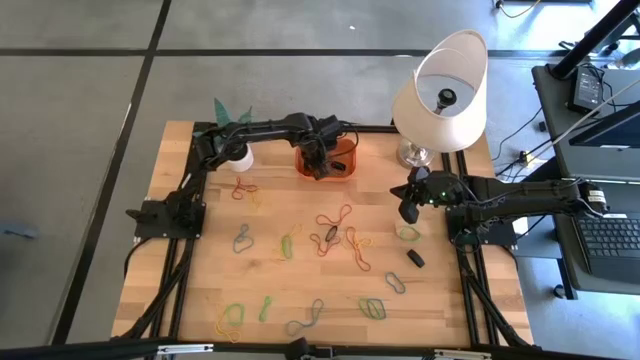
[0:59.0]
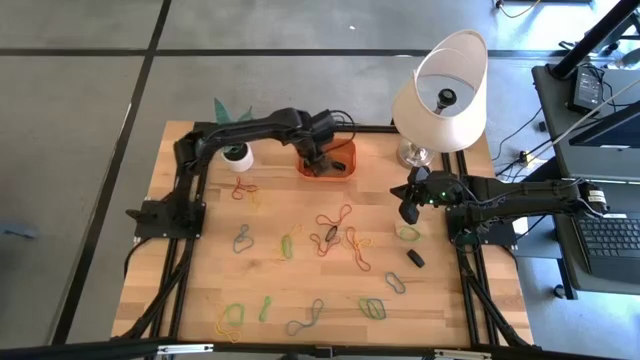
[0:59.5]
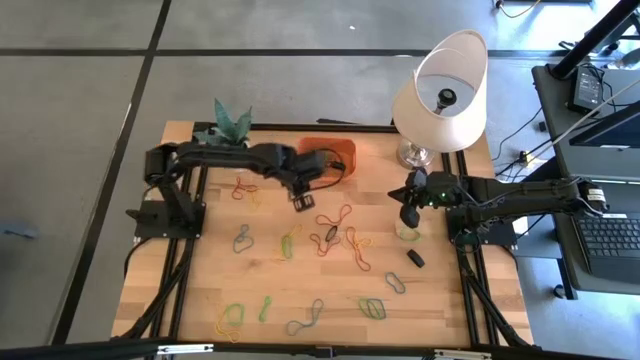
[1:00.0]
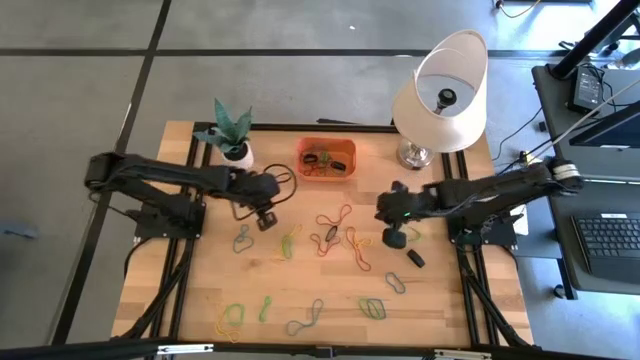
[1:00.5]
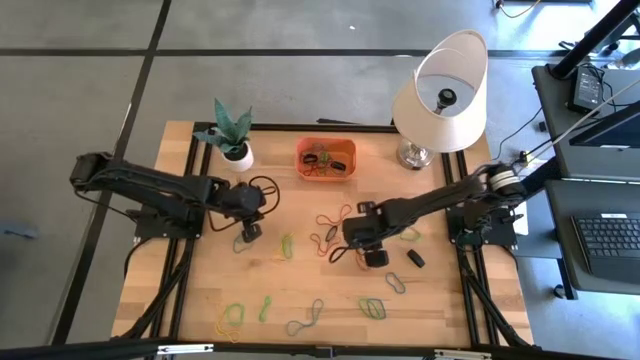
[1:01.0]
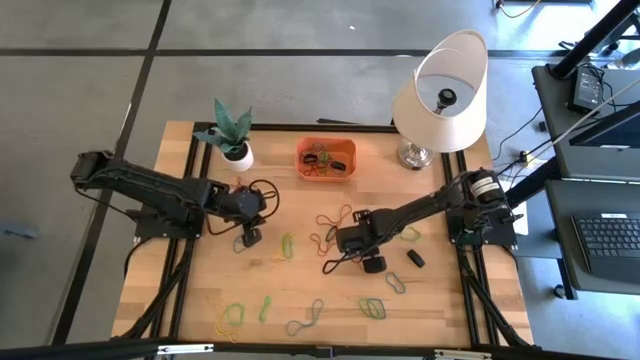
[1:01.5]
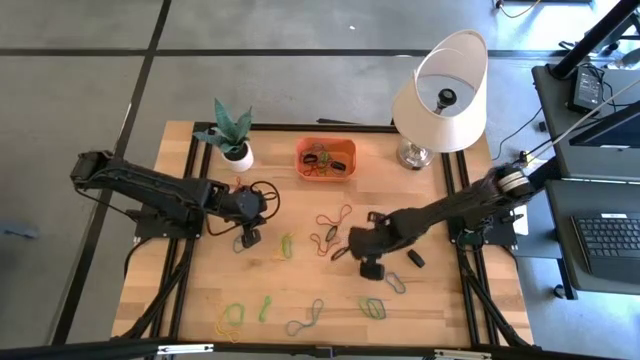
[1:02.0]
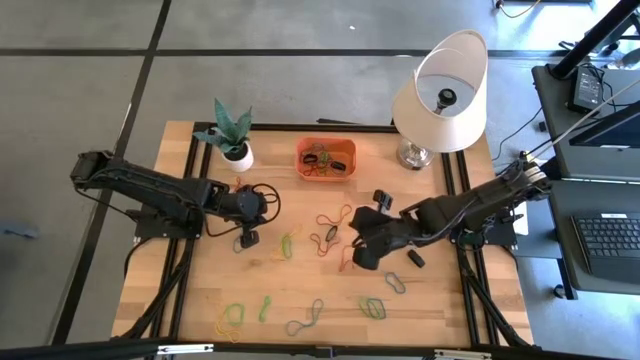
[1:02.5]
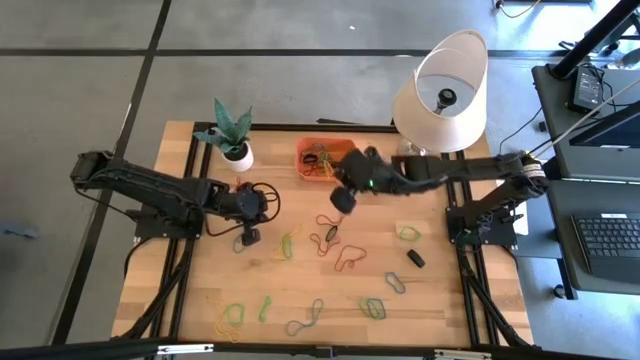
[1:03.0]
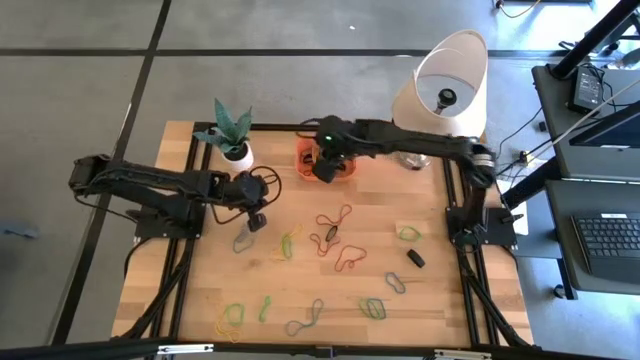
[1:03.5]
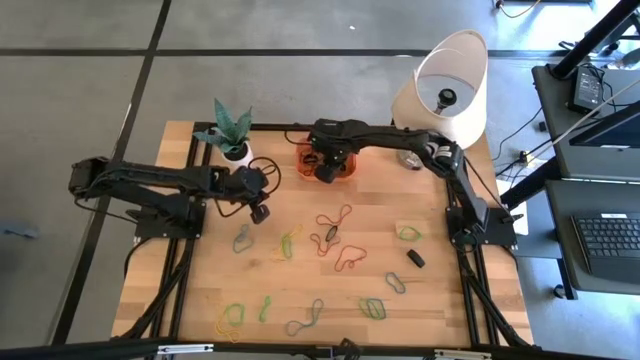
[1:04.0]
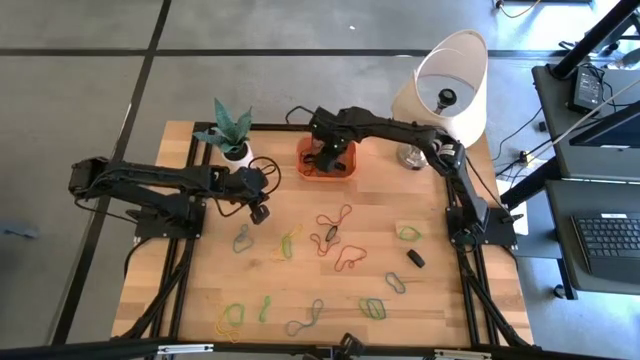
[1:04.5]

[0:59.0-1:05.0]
Task: Pick and place rubber bands into bin
Put the yellow rubber band into the orange bin

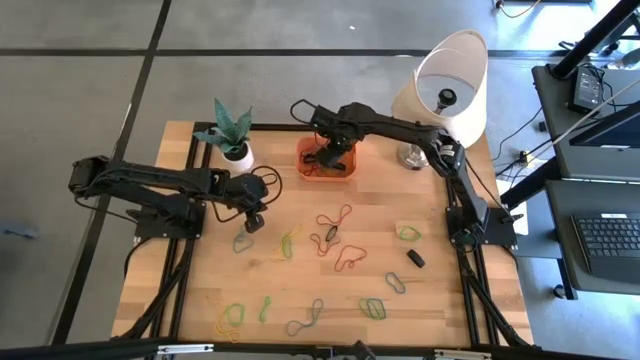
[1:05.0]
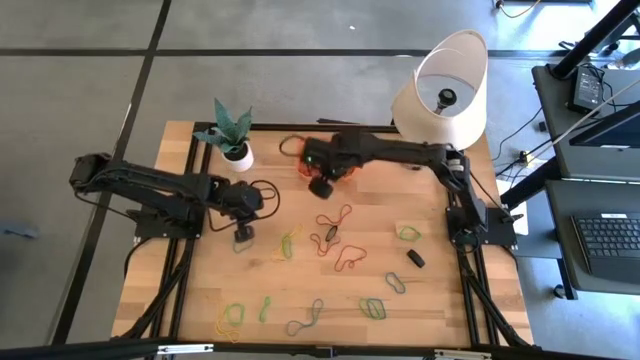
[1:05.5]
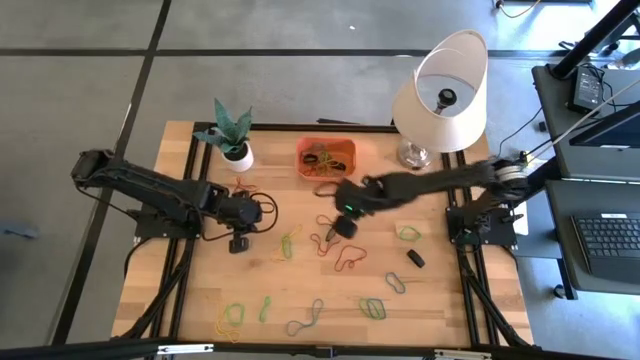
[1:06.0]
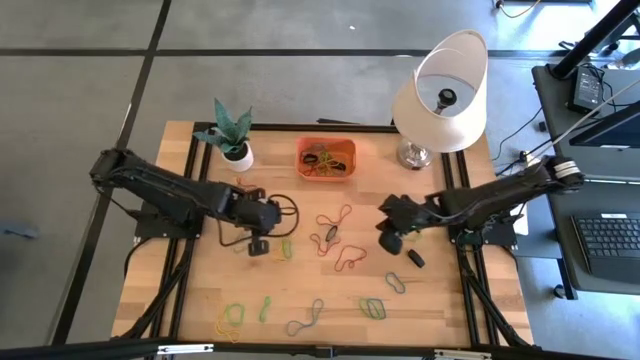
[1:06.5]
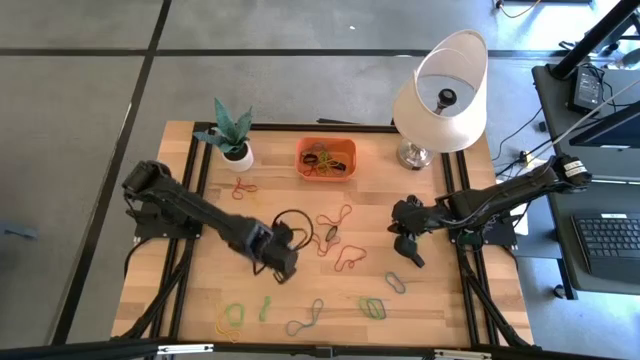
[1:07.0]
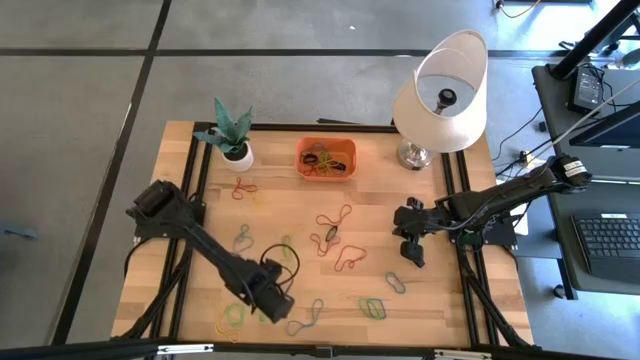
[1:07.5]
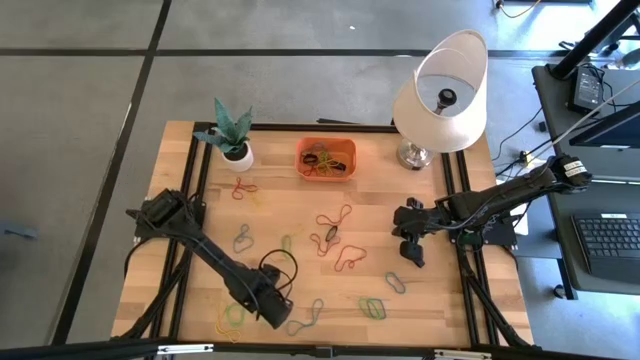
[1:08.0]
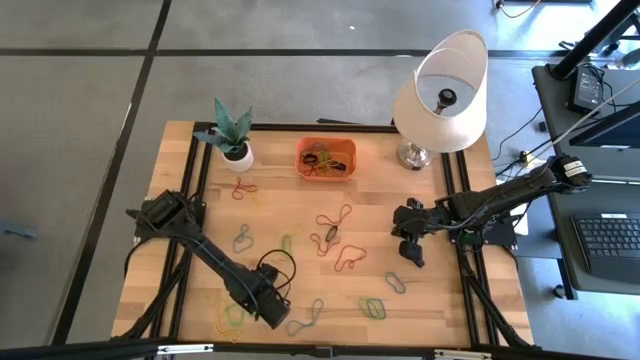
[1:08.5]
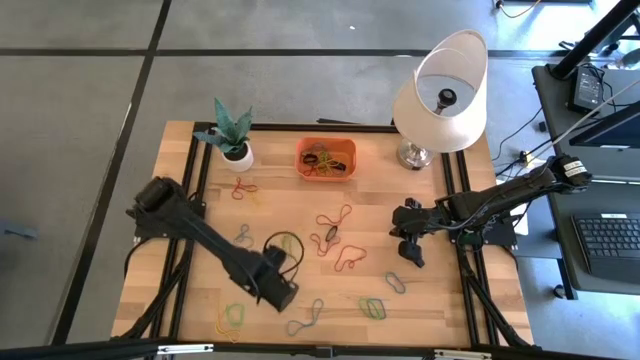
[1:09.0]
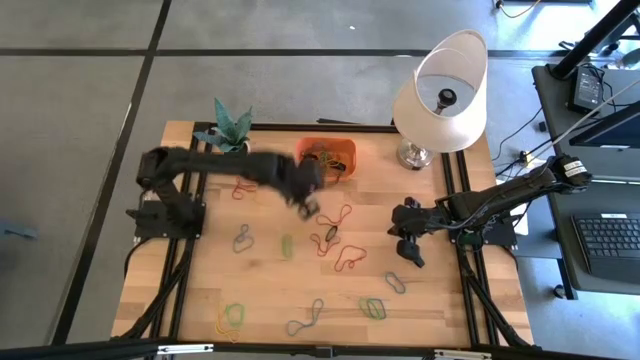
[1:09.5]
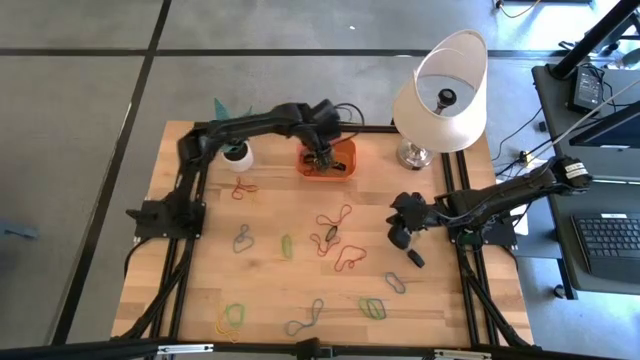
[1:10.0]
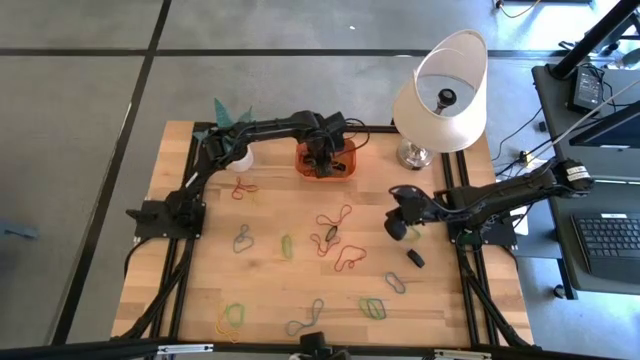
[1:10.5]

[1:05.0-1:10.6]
Put the green rubber band into the orange bin

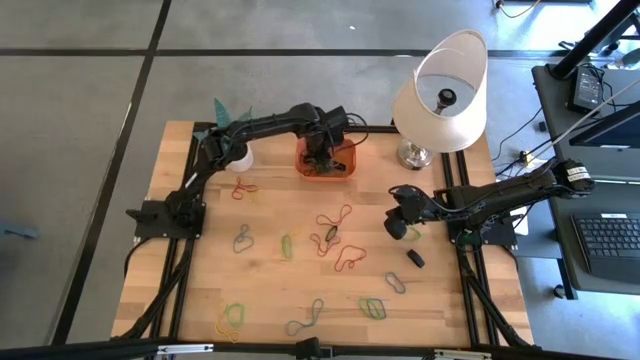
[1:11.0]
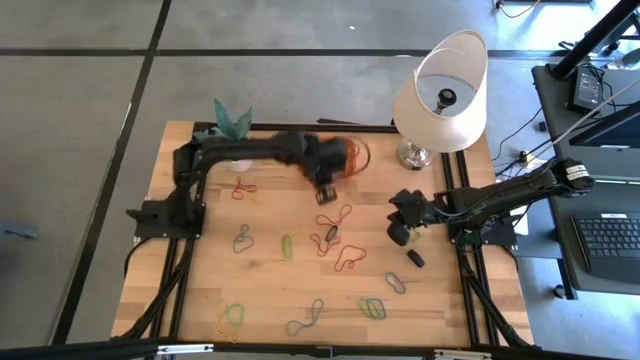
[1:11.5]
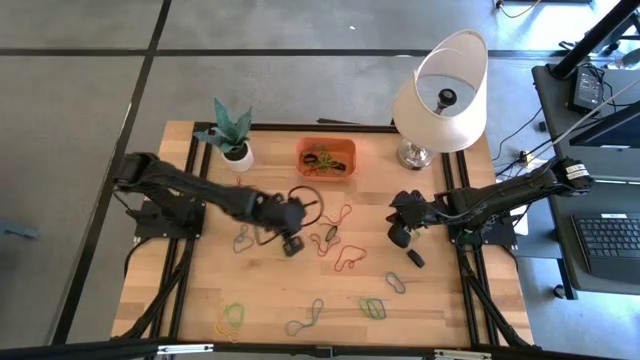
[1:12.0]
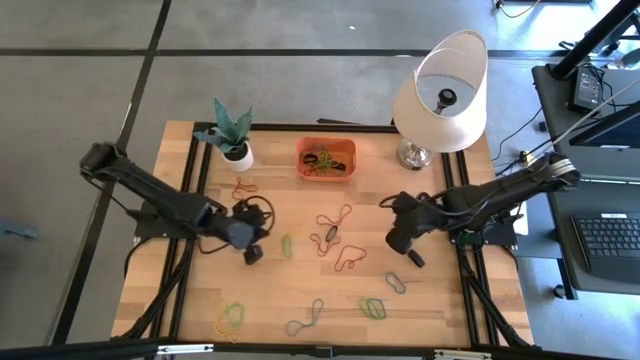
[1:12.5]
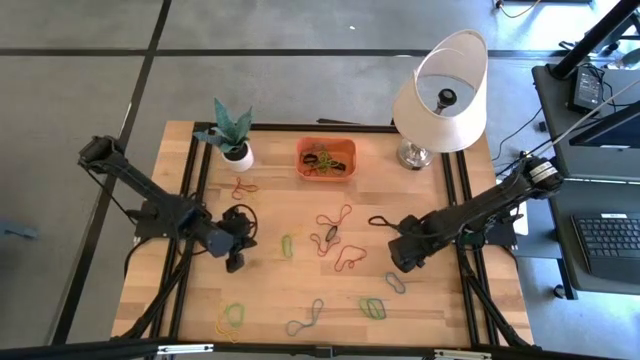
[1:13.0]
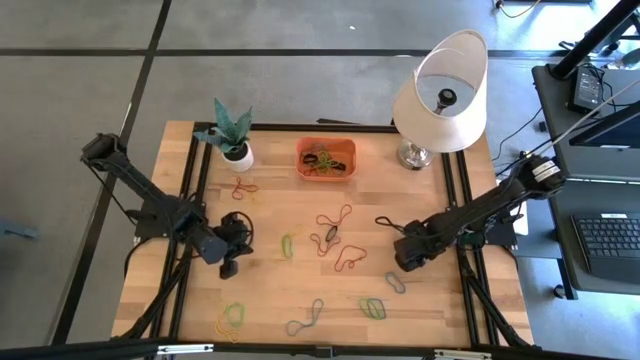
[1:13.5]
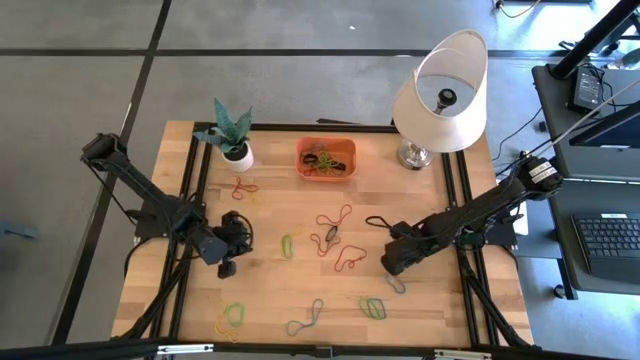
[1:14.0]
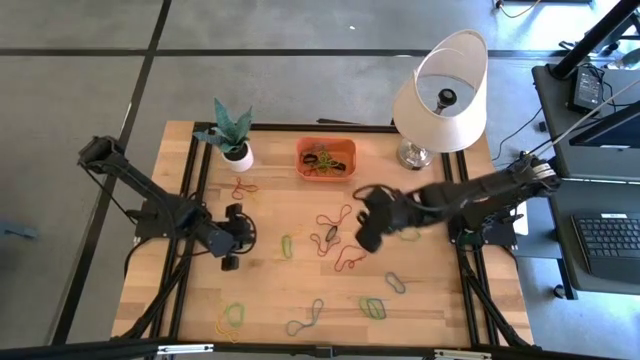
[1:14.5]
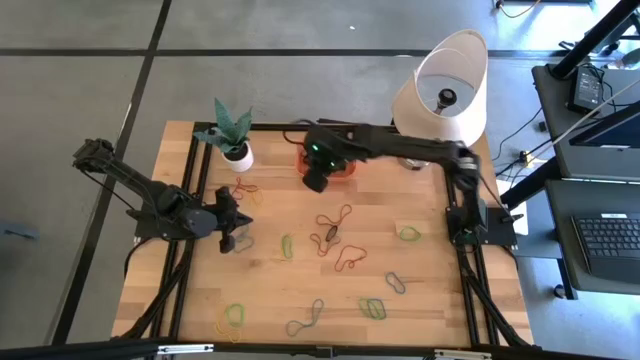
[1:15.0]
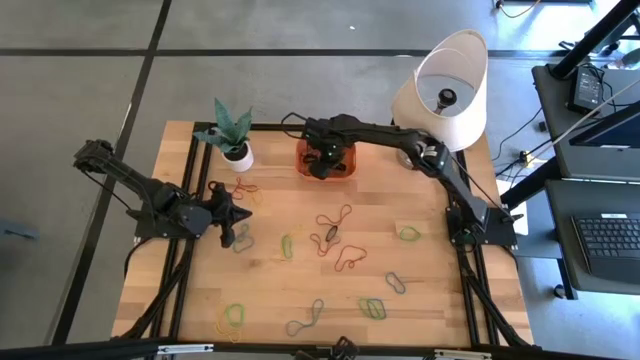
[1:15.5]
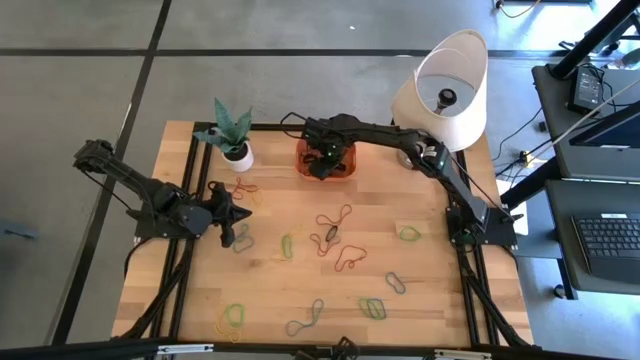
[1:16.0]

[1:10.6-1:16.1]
Put the right black rubber band into the orange bin

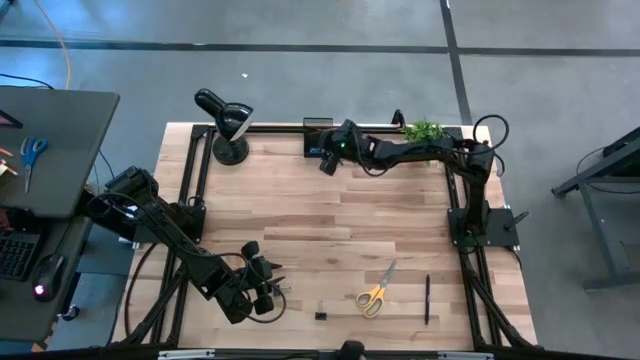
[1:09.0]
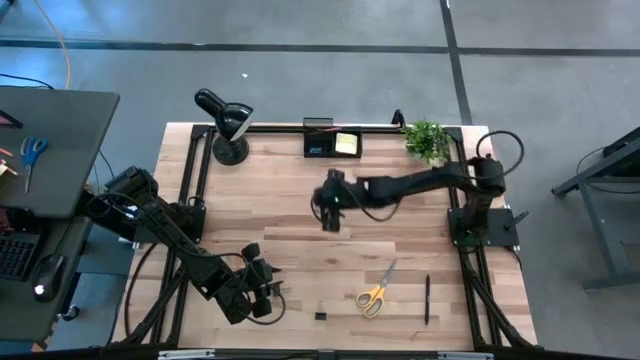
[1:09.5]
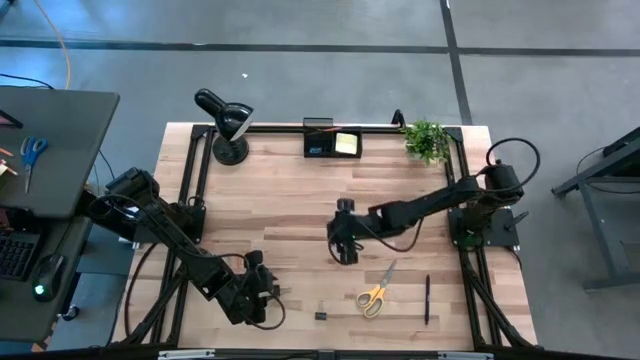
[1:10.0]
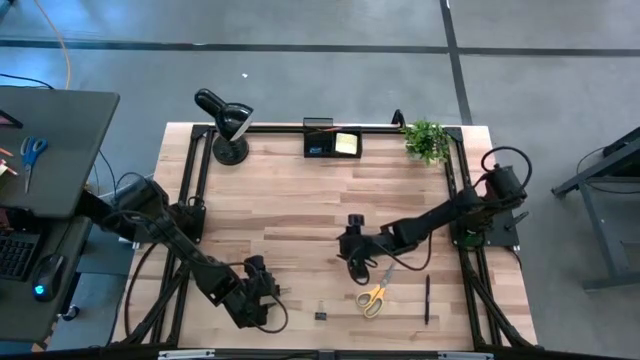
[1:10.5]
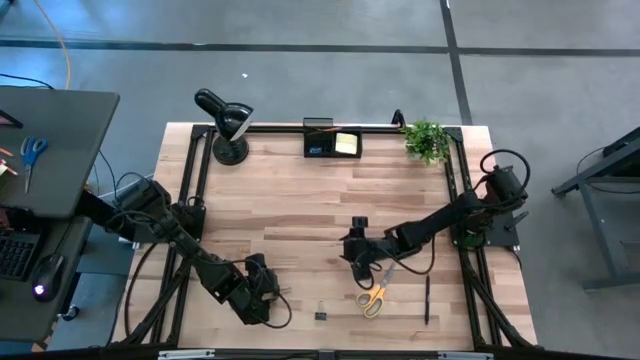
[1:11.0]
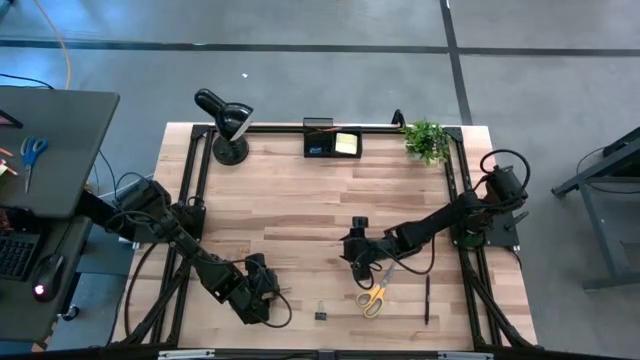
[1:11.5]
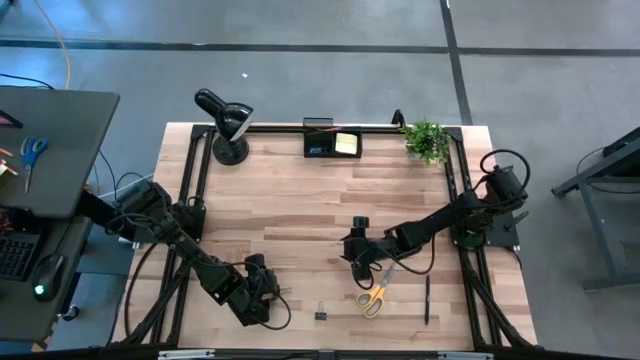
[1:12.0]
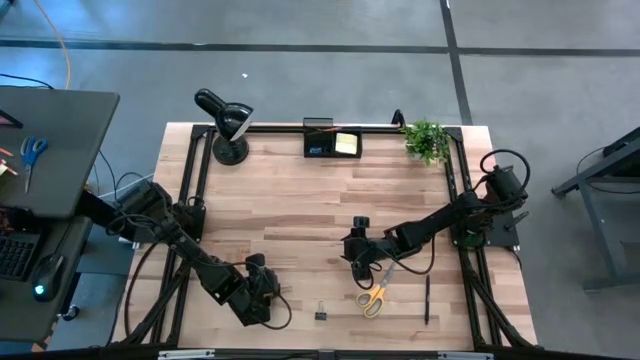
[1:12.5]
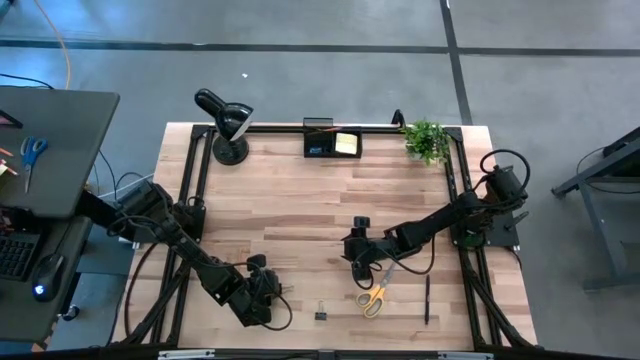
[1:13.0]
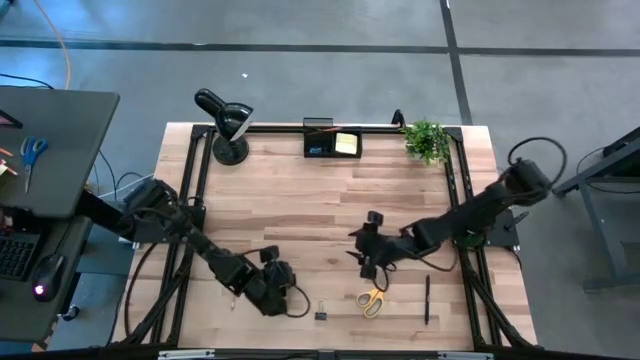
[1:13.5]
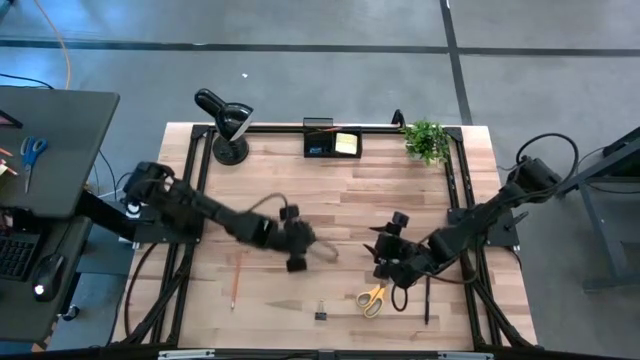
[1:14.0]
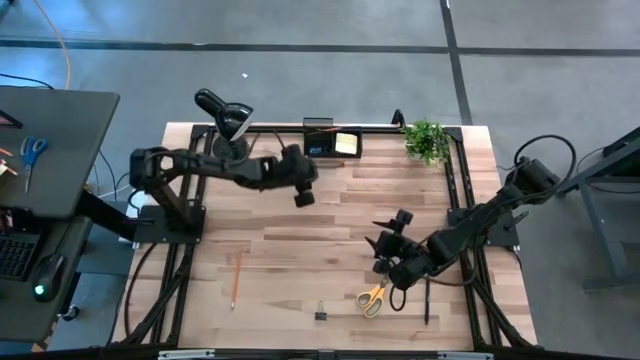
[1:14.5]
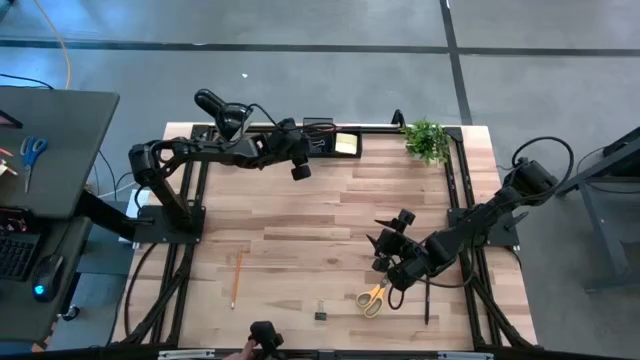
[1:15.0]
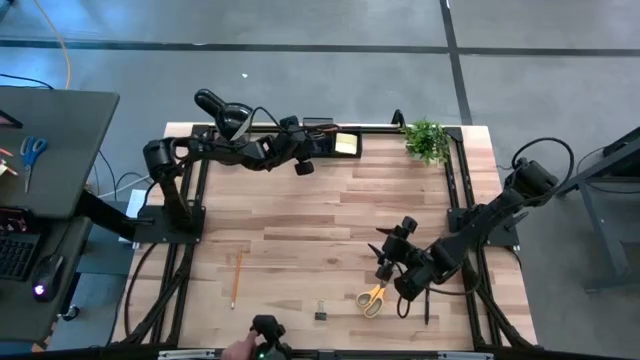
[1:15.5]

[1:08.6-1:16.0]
Task: Pick and place office supplies into organizer
Put the black binder clip into the black desk organizer
